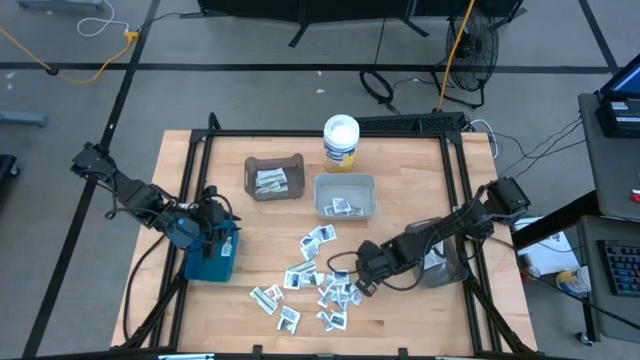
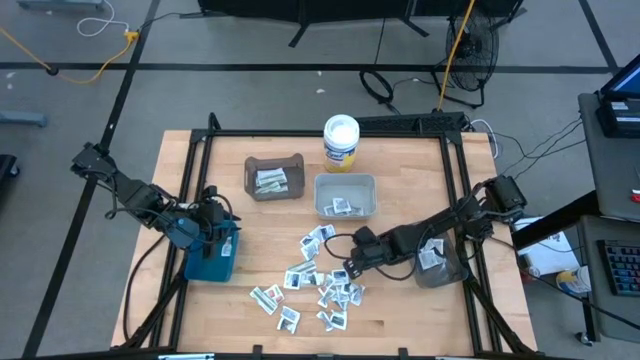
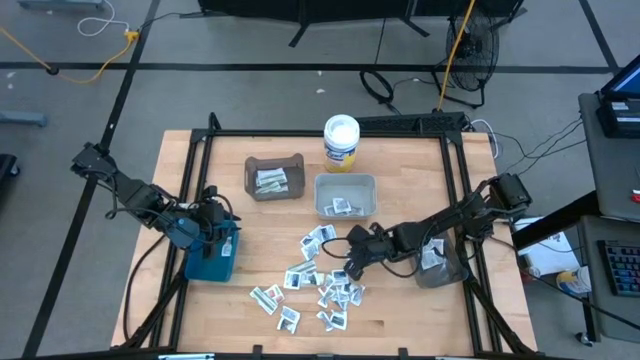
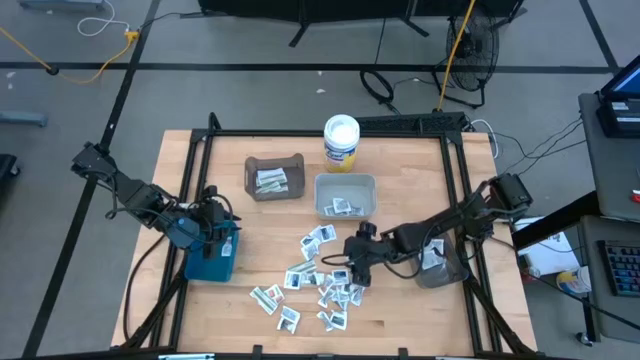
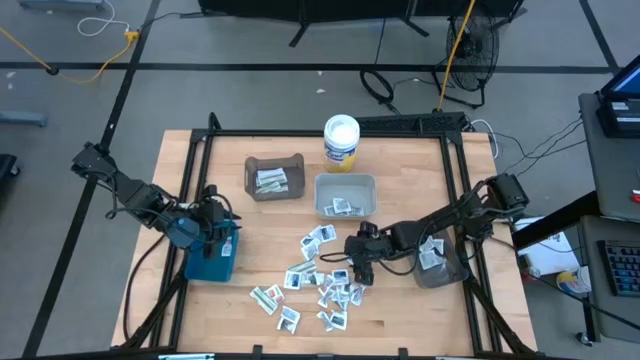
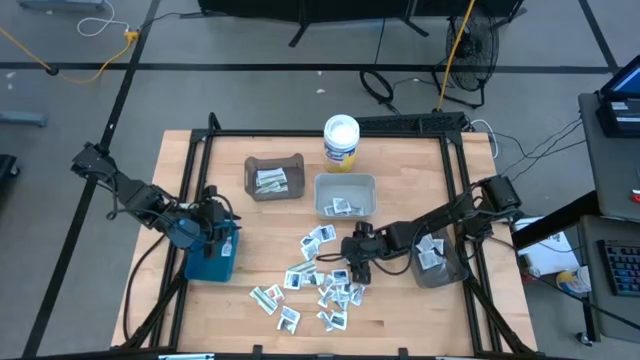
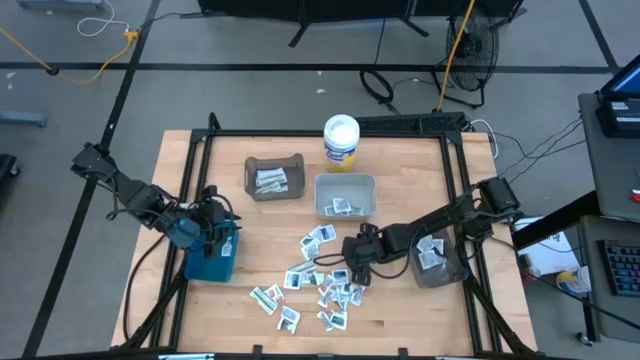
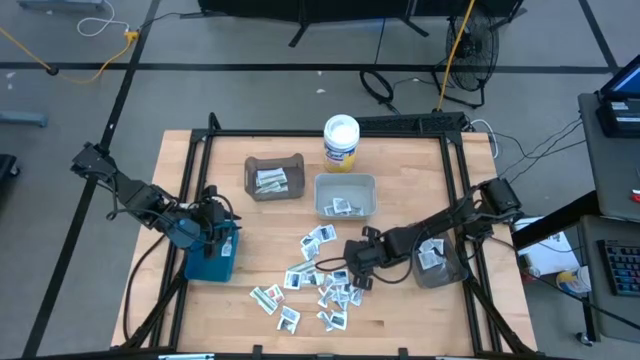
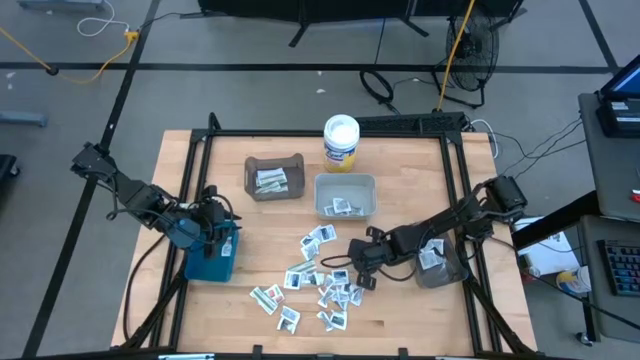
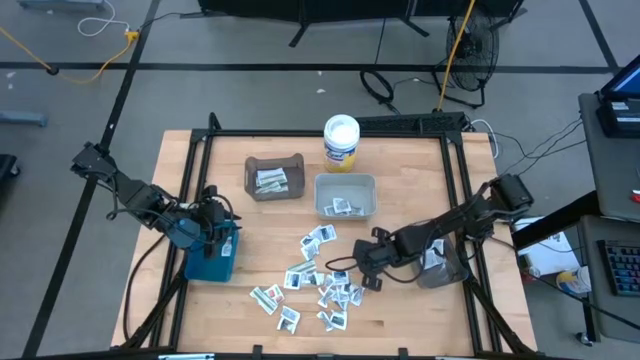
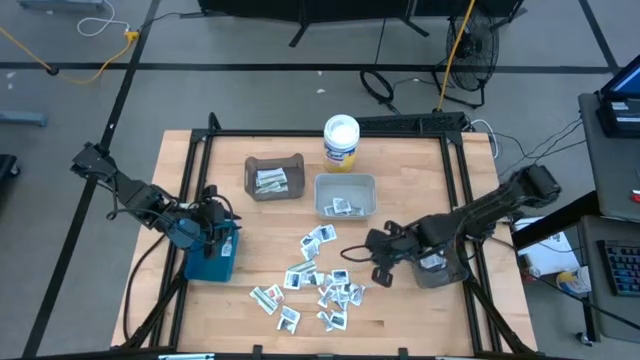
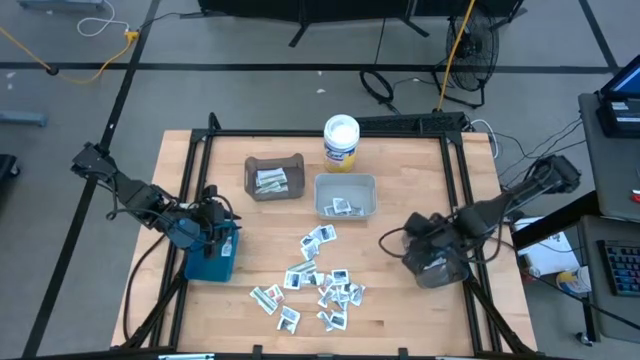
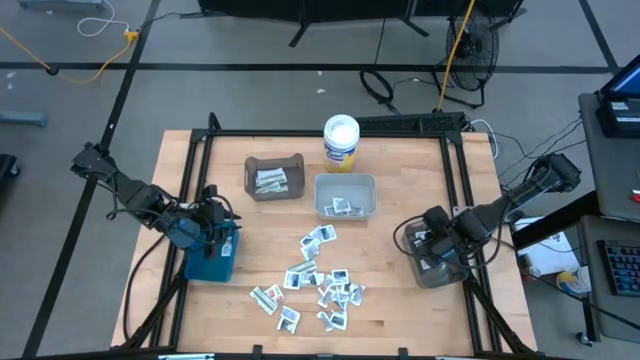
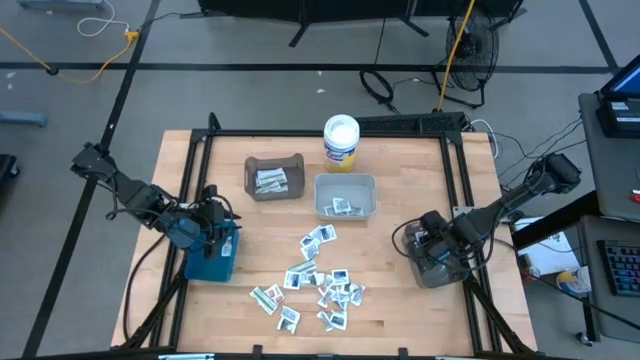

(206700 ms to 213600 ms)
Task: Pick & Place First Aid Supplies
Put the blue alcohol pad into the bottom black bin

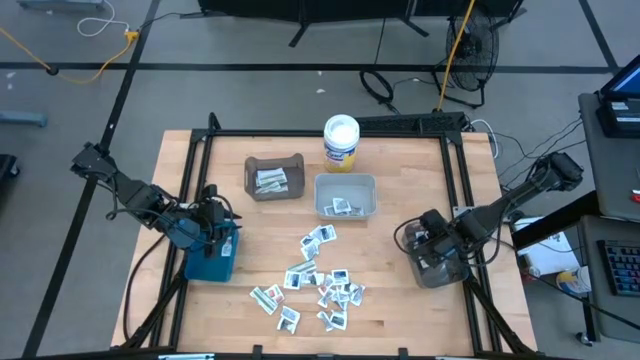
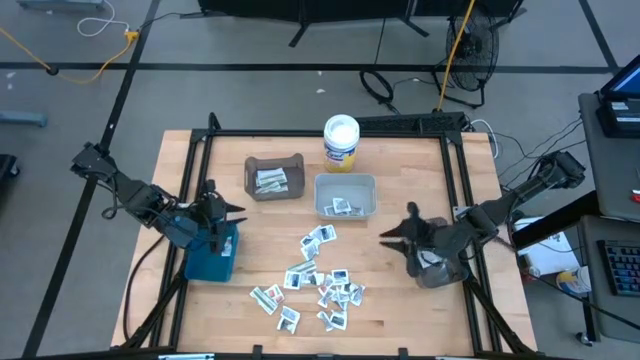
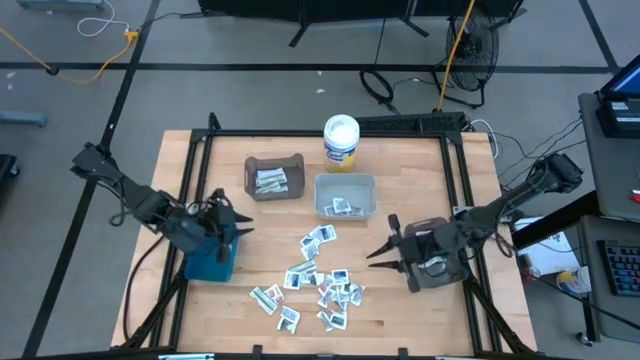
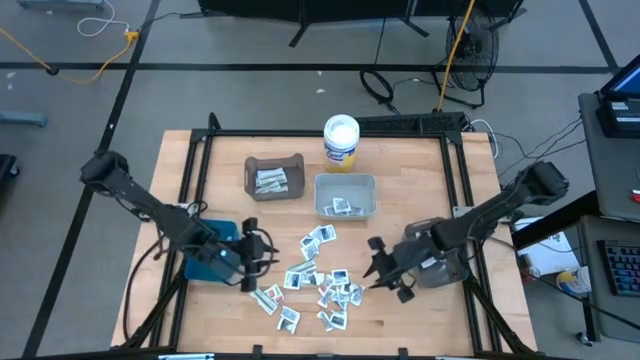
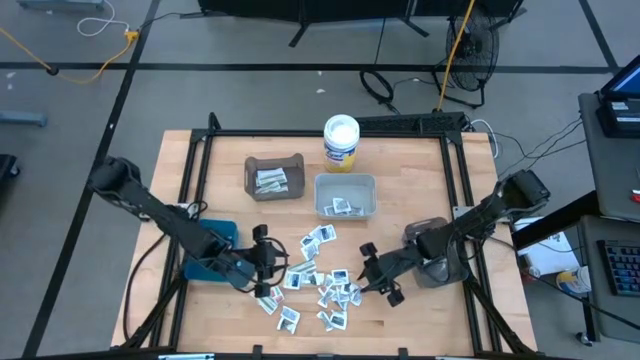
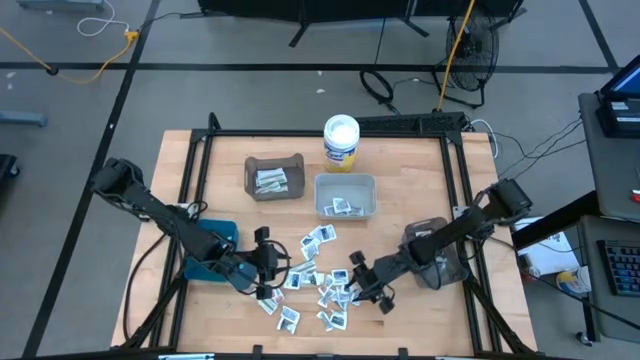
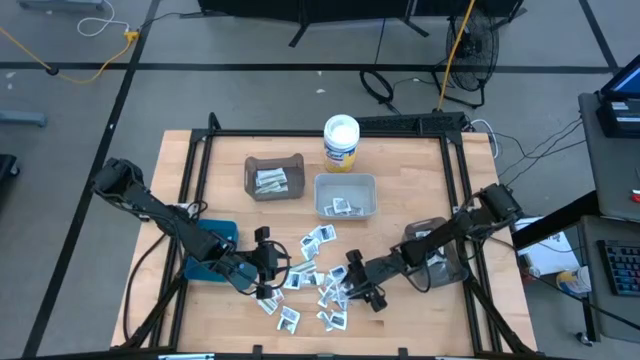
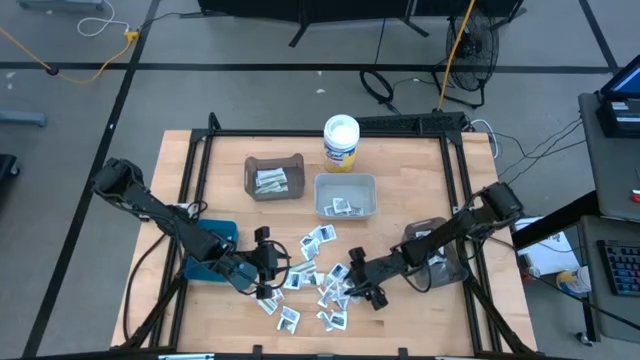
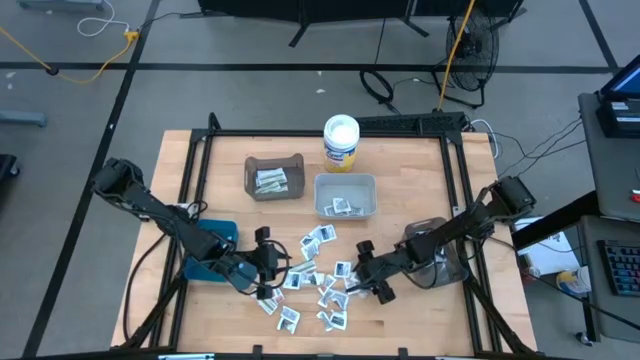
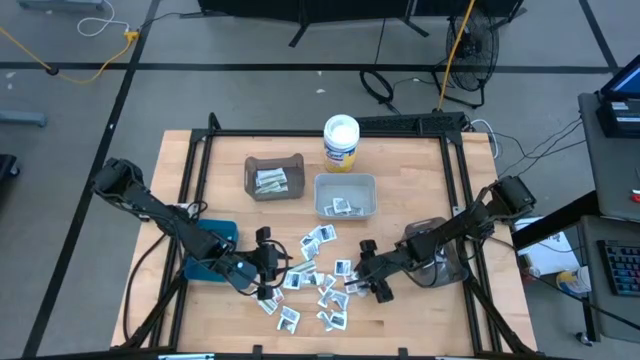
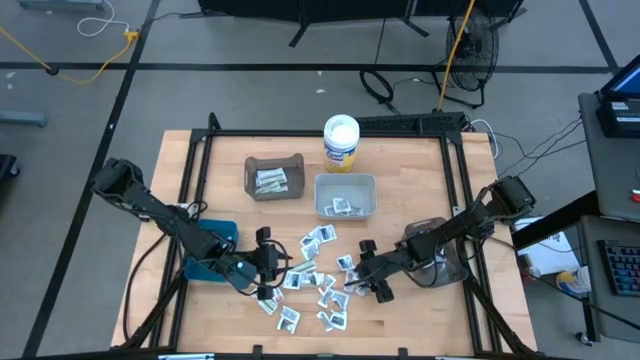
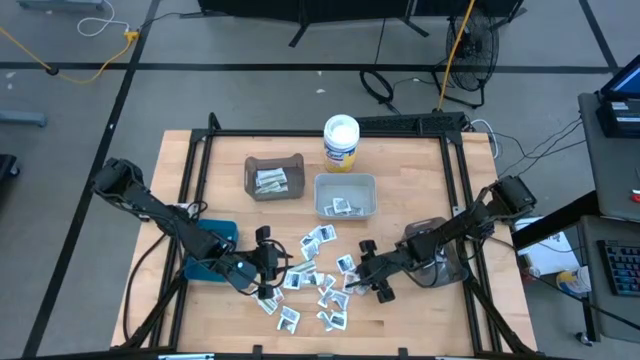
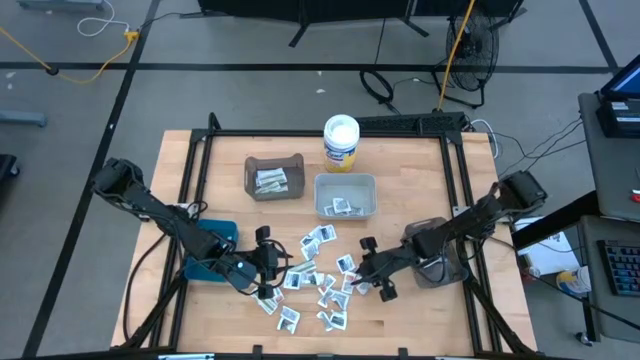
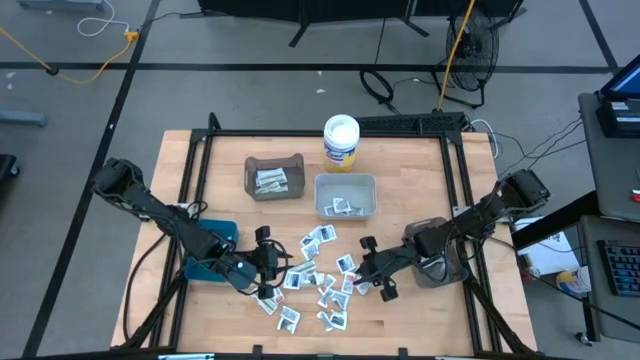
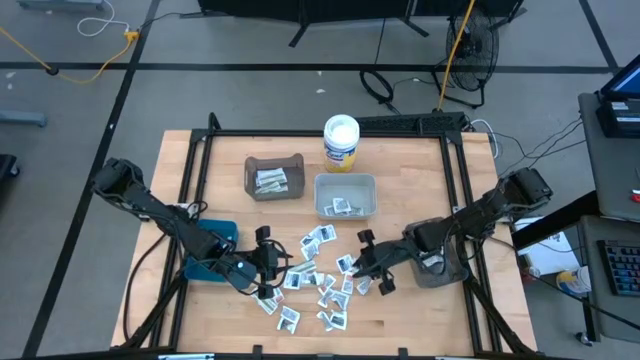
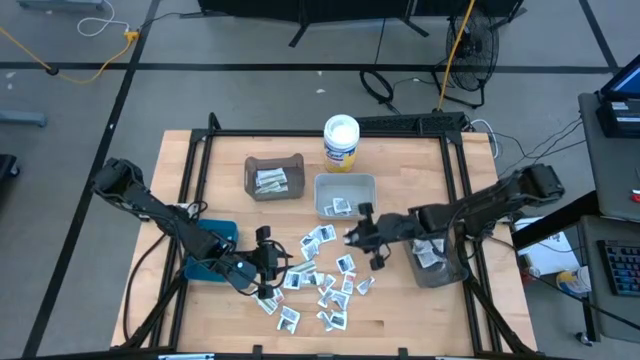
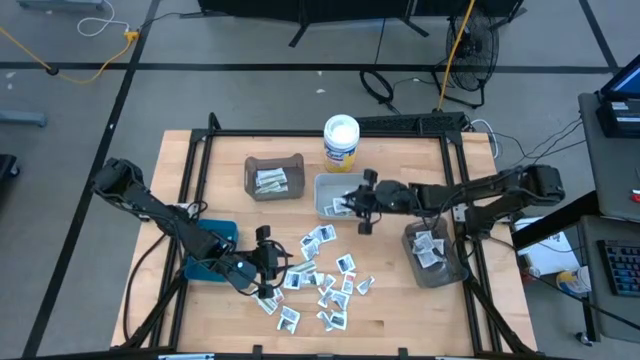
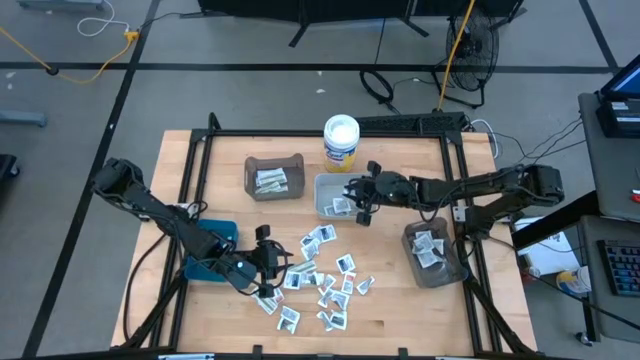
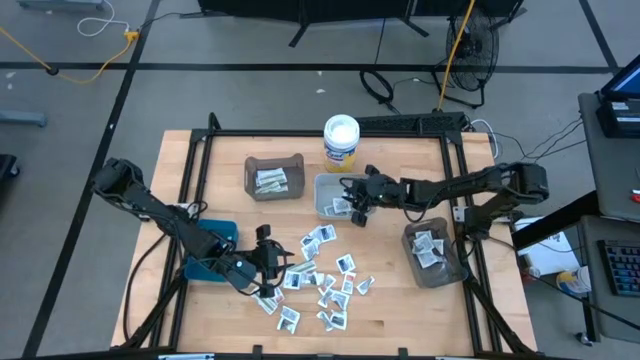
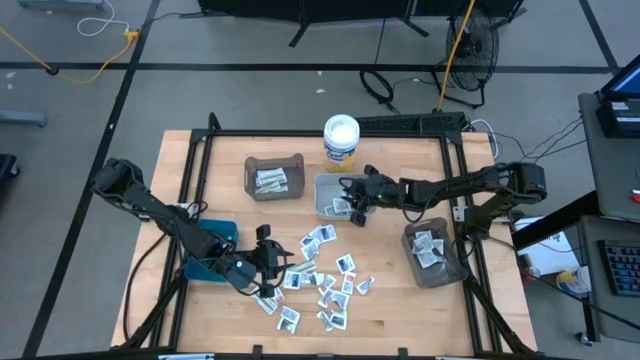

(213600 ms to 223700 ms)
Put the gray towelette pack into the gray bin

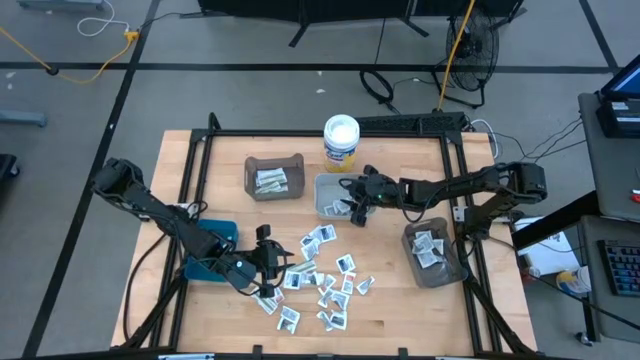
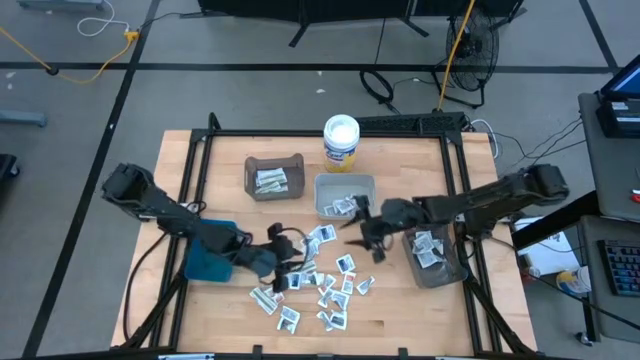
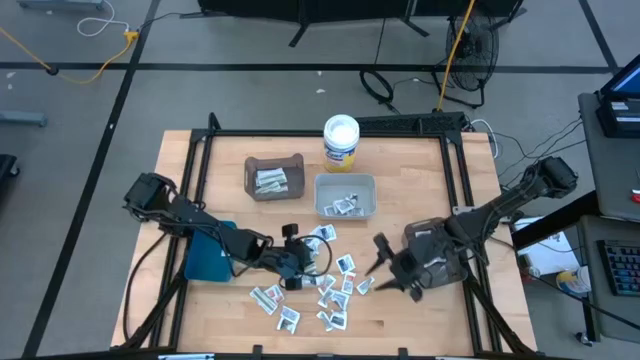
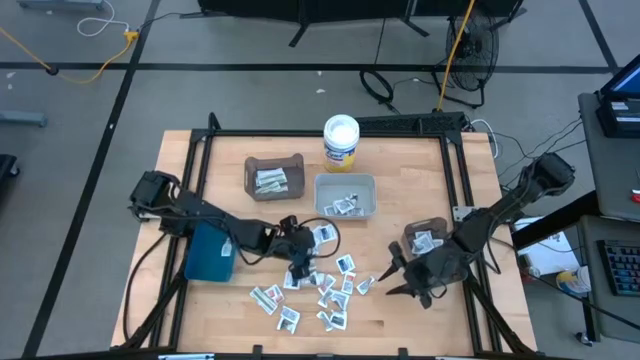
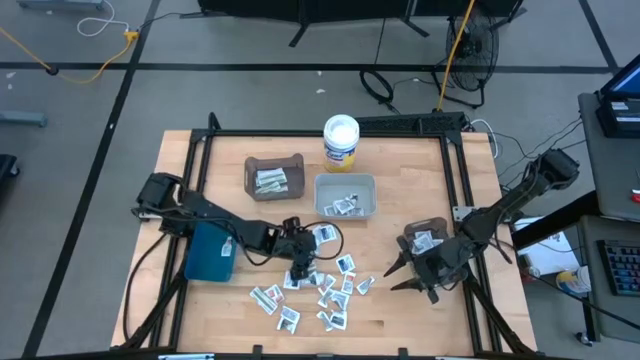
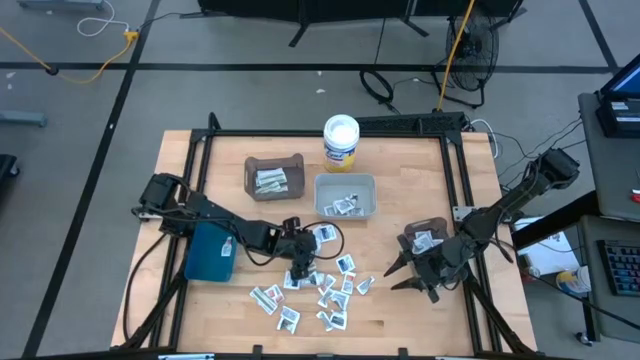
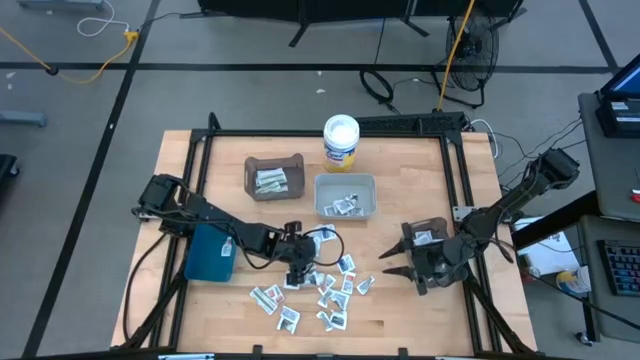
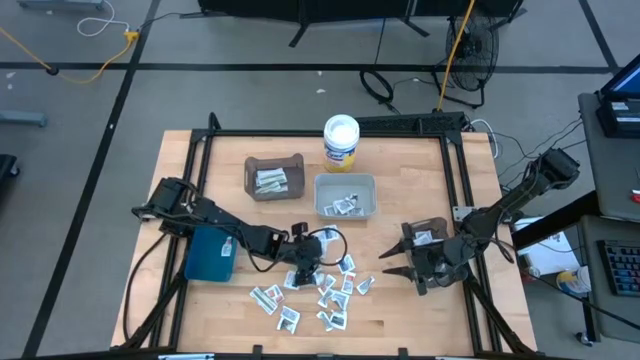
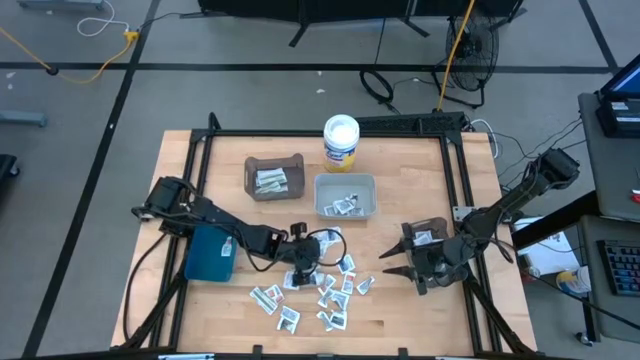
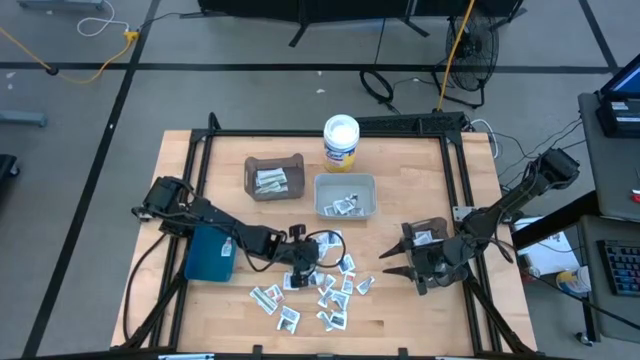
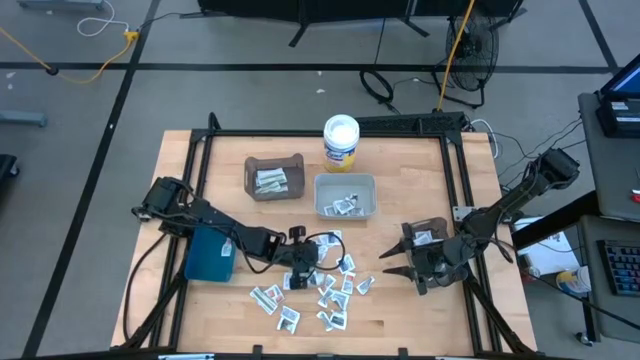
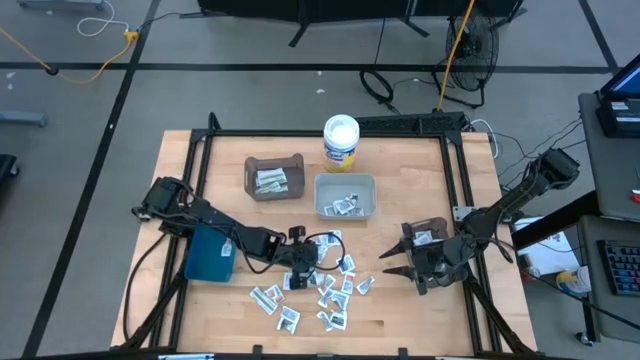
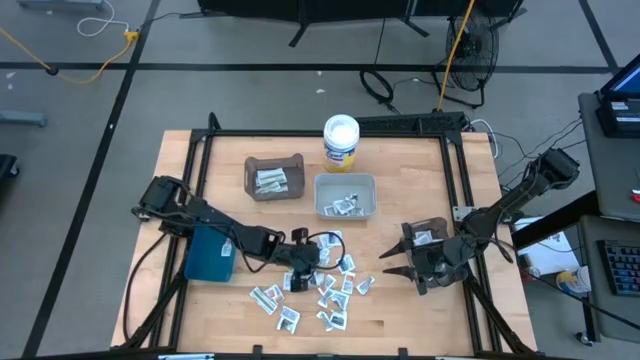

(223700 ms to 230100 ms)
Put the gray towelette pack into the gray bin
